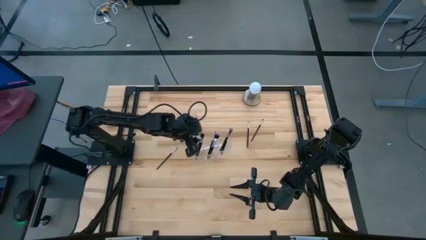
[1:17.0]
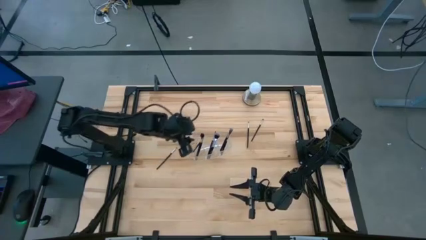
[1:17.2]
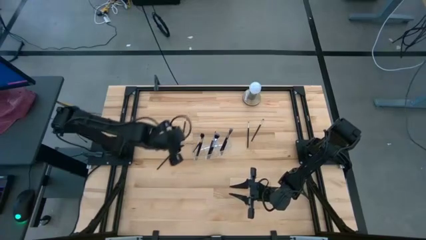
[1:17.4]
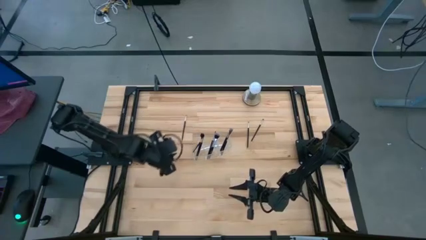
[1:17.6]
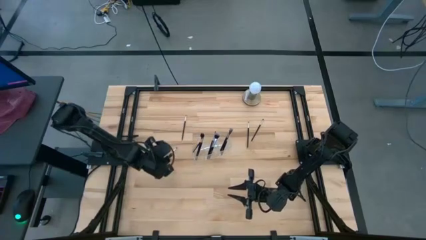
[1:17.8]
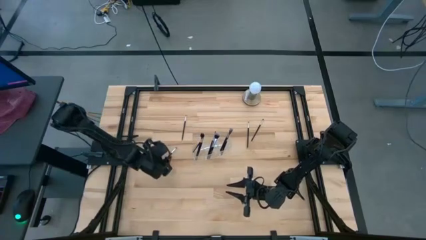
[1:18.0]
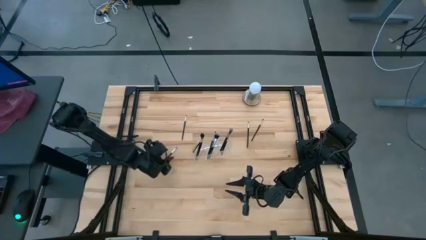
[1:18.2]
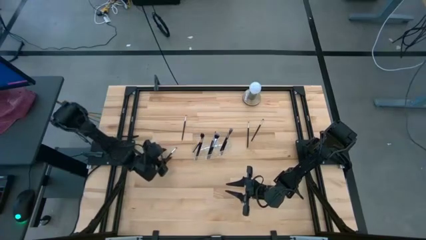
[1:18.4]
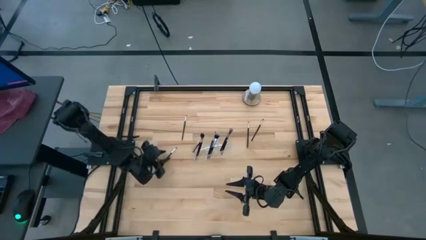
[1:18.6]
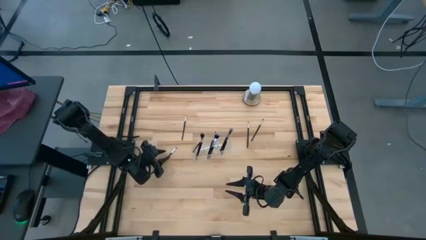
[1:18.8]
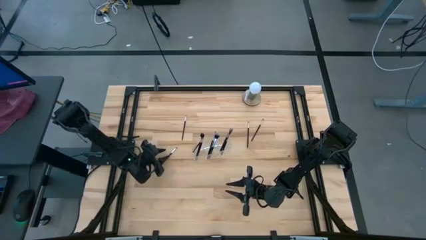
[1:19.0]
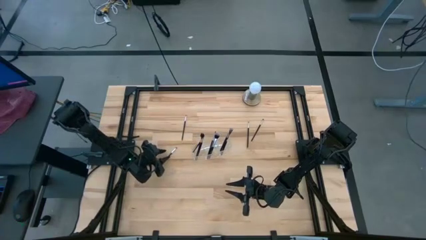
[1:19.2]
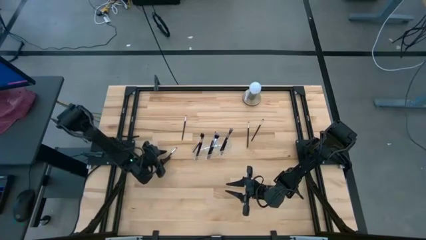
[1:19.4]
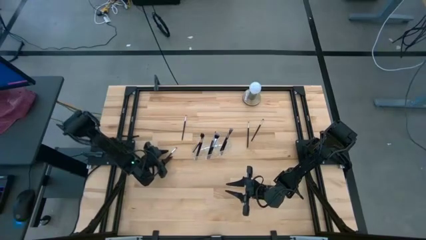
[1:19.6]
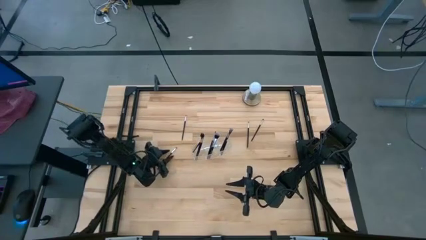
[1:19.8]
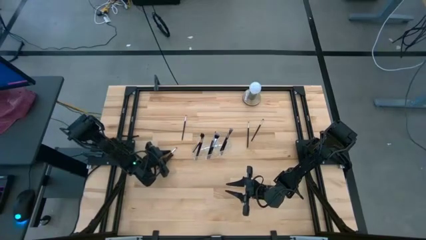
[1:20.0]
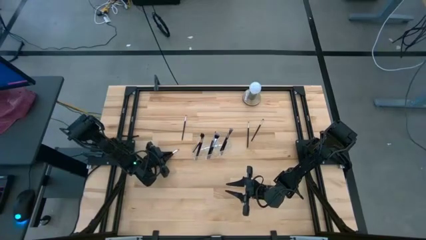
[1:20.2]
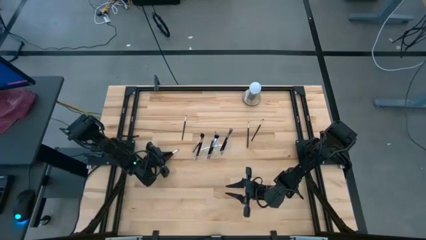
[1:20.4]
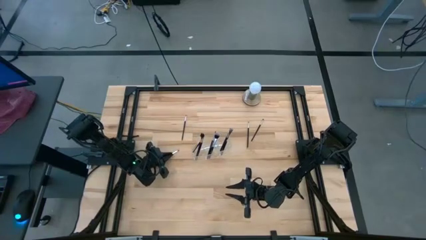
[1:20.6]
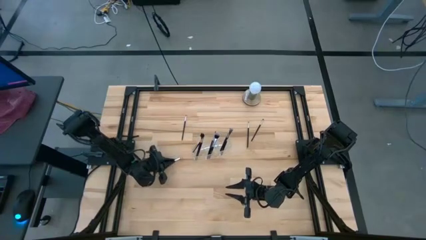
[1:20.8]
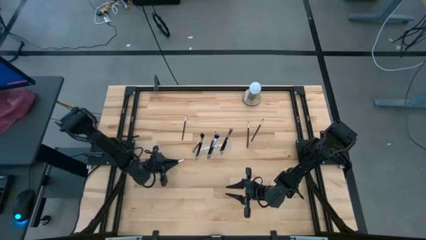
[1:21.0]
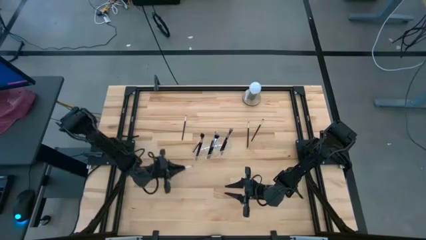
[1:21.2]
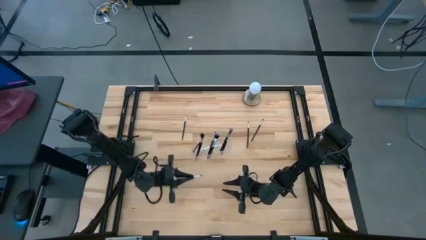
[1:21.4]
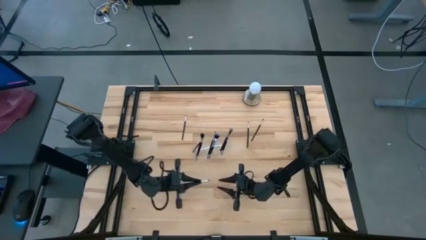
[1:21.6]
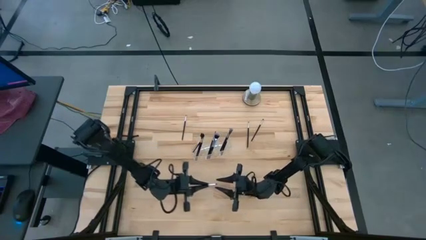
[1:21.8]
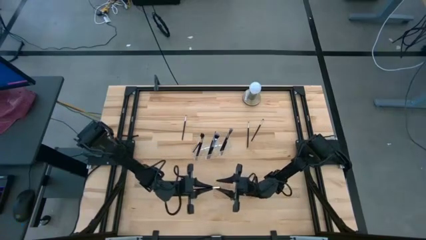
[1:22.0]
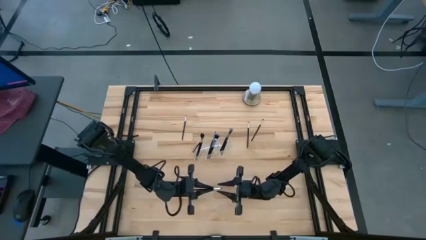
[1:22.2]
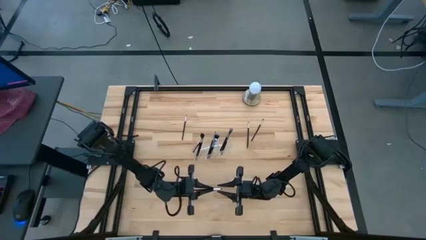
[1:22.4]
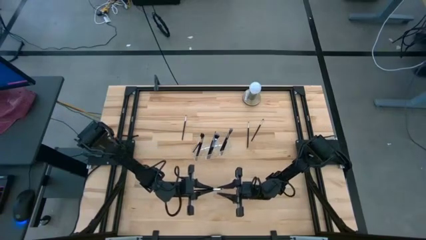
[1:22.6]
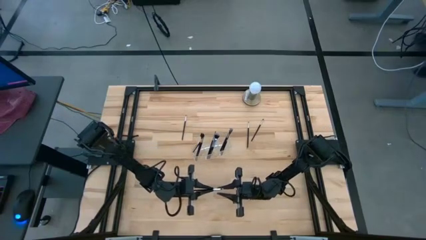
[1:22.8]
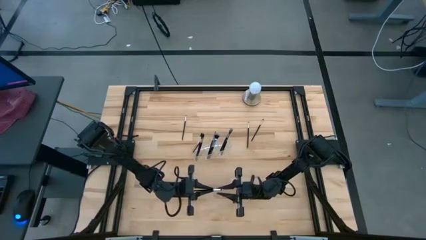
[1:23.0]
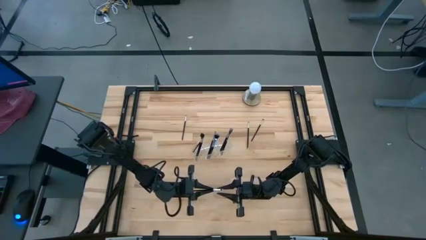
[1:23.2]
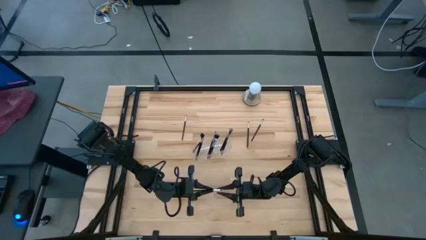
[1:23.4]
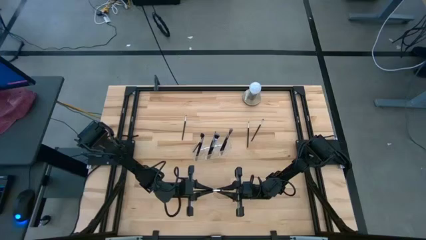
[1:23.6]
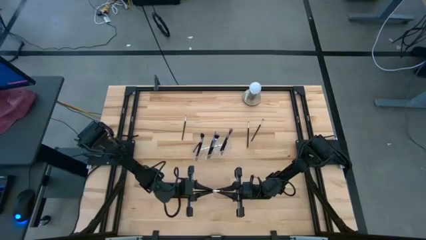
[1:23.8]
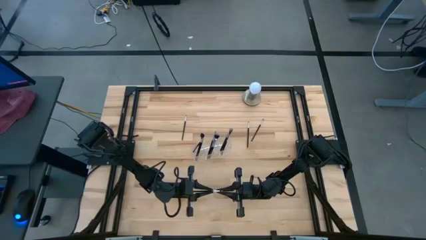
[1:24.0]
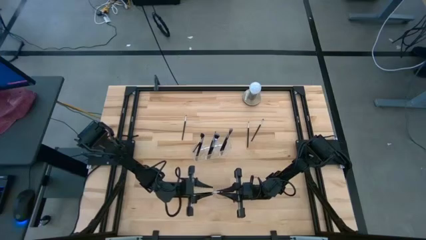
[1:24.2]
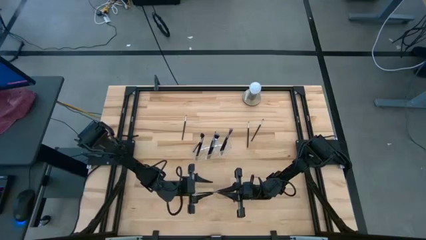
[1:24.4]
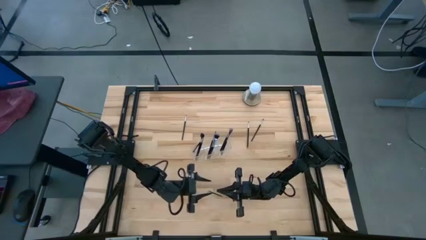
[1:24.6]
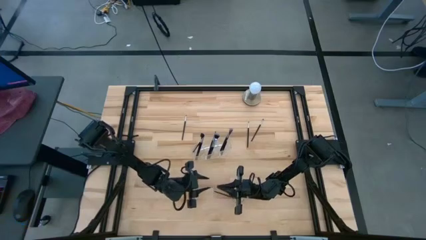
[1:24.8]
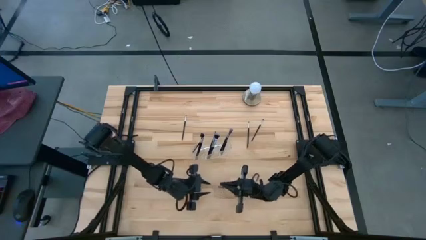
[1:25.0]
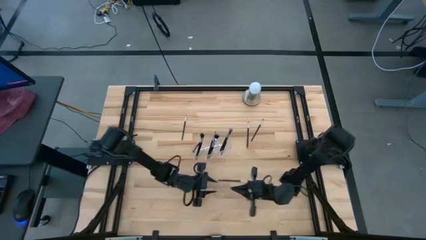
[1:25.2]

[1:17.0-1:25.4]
Task: Put items in baskets/containers
Put the eyeshadow brush into the transparent organizer

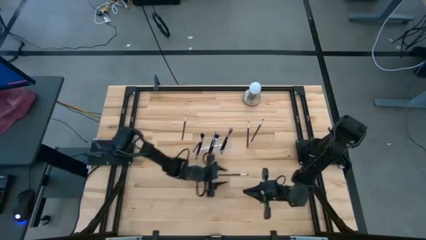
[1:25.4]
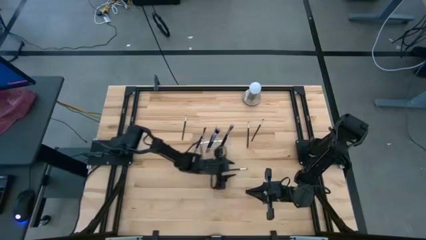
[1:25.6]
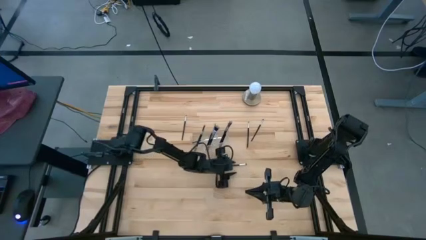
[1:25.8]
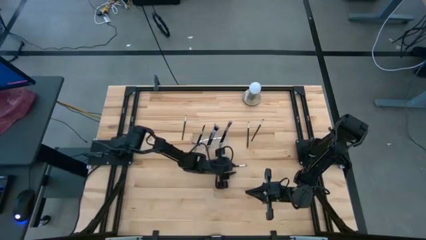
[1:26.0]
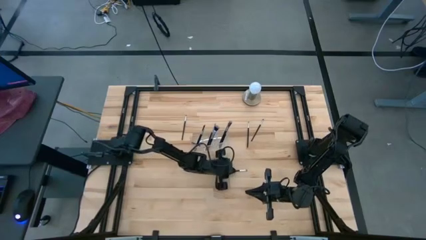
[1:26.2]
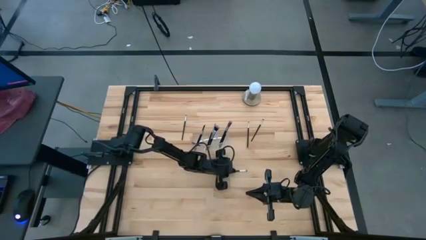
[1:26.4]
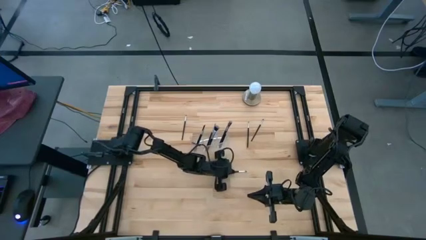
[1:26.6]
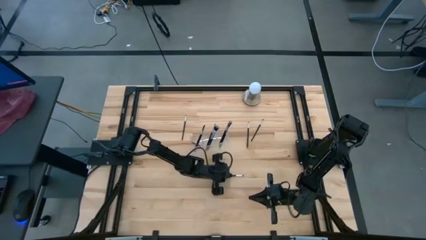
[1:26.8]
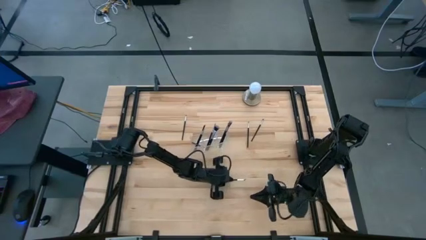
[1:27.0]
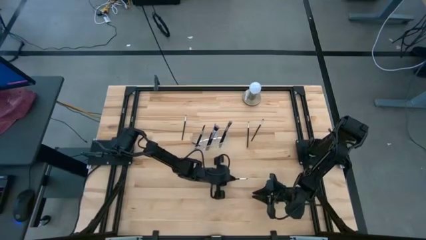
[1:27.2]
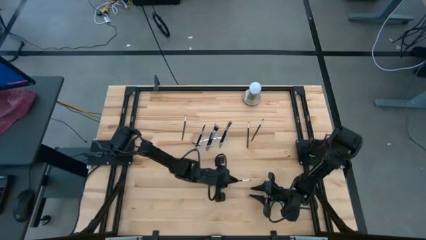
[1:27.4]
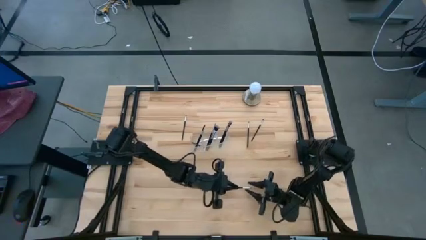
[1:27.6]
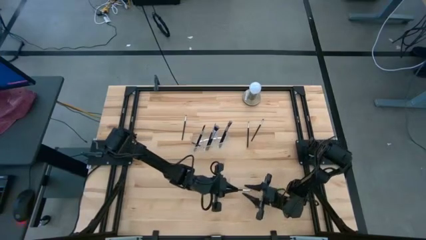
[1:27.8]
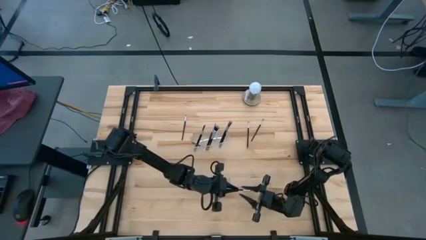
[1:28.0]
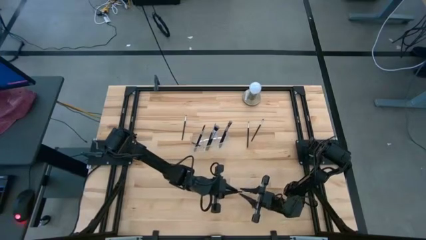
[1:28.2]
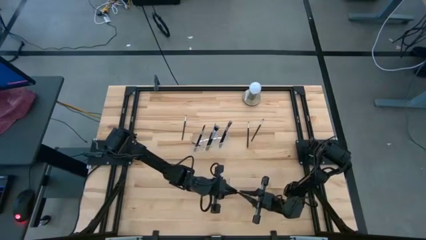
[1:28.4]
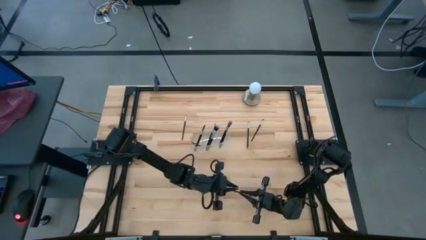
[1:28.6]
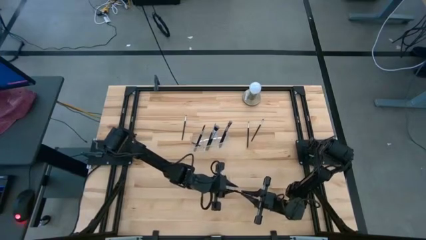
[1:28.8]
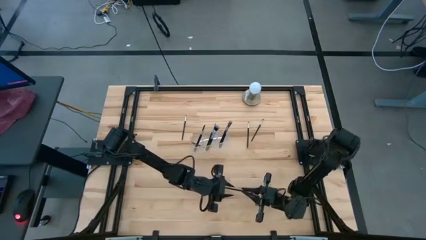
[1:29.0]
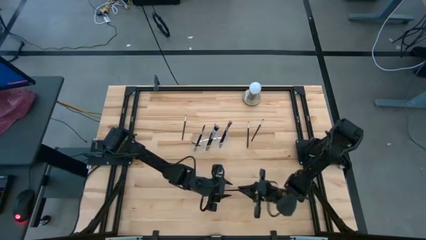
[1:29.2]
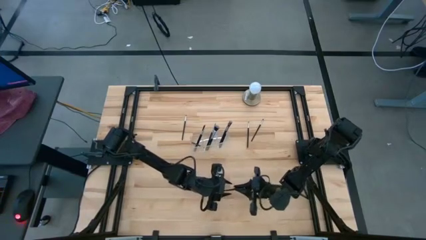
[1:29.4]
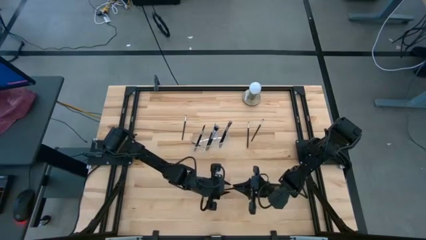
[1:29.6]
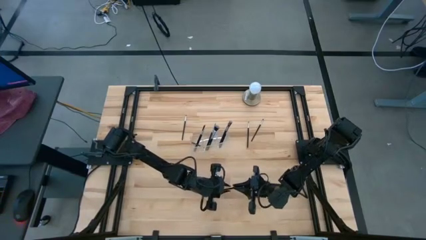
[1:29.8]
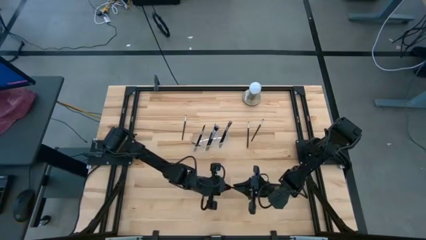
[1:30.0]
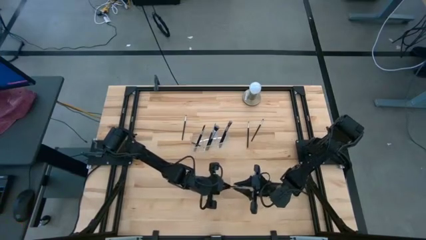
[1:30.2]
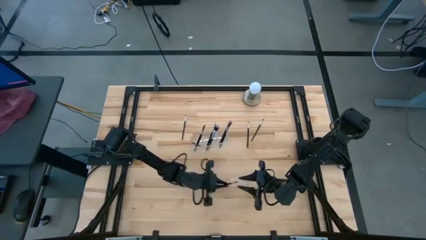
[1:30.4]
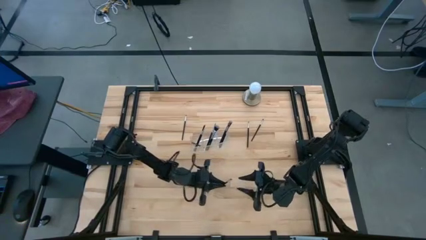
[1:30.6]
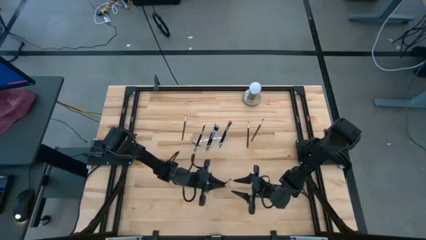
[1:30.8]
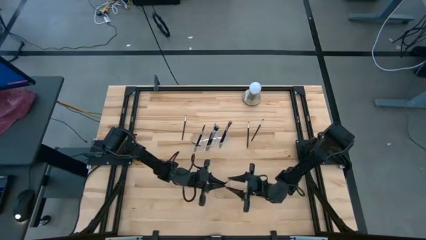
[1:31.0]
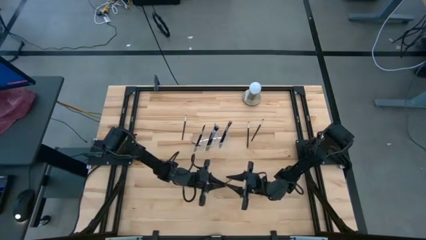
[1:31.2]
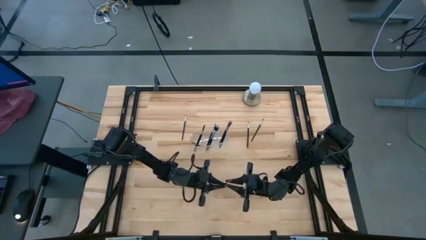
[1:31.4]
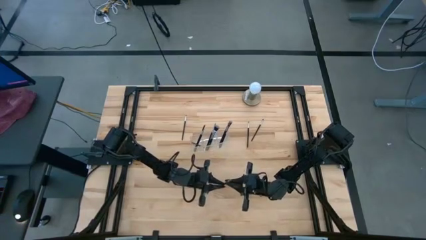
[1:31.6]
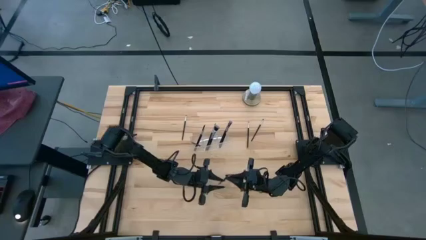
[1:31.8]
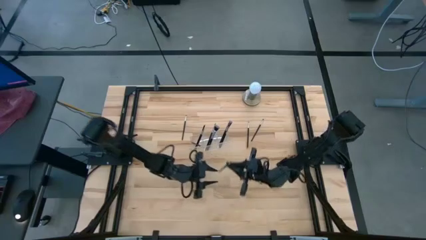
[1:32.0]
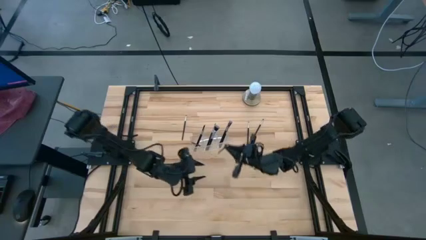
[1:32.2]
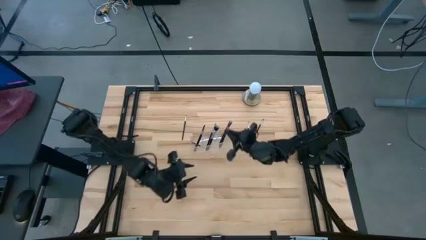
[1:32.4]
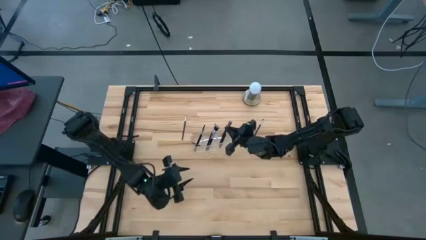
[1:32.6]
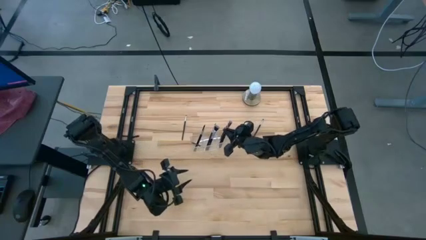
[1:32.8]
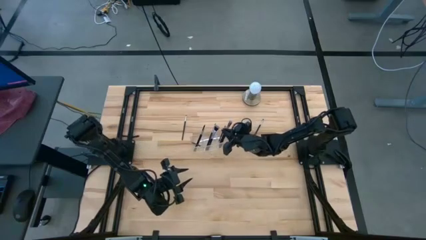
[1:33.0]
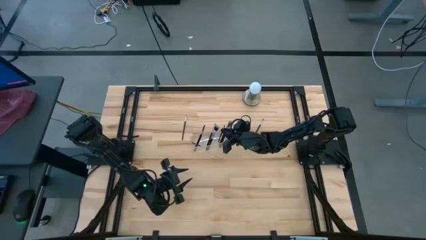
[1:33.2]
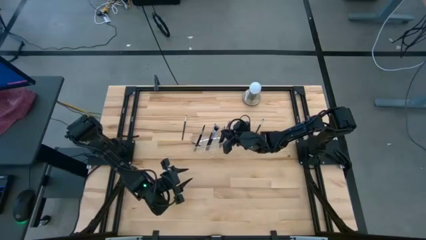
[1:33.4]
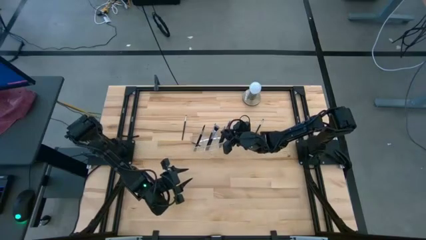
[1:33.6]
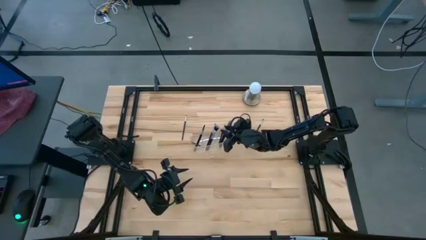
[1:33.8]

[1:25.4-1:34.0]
Put the eyeshadow brush into the transparent organizer
